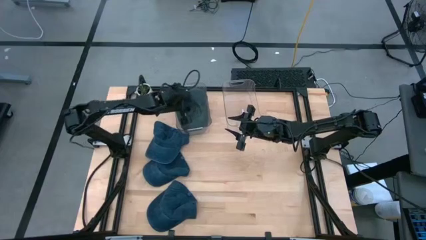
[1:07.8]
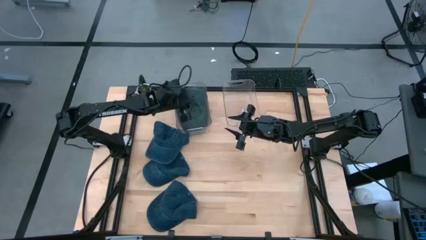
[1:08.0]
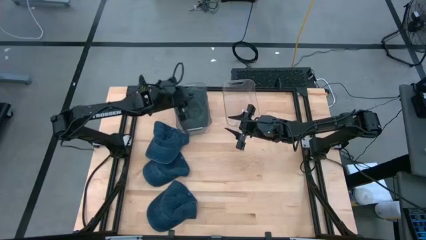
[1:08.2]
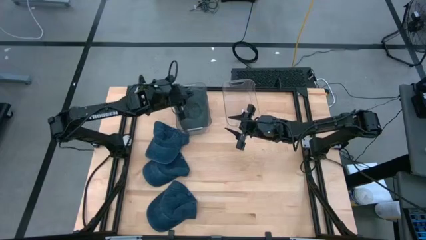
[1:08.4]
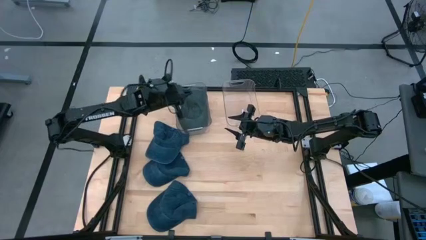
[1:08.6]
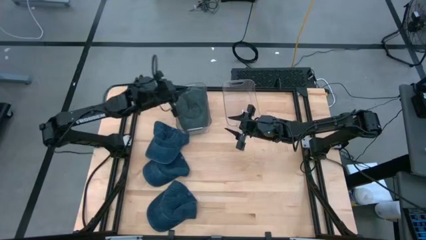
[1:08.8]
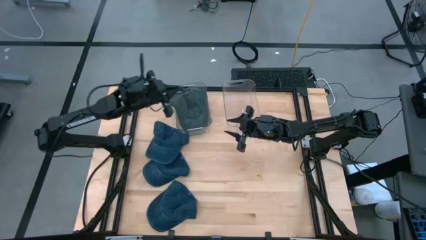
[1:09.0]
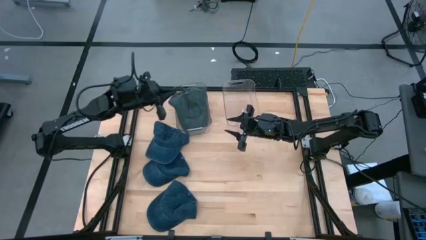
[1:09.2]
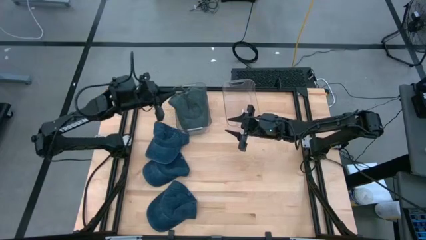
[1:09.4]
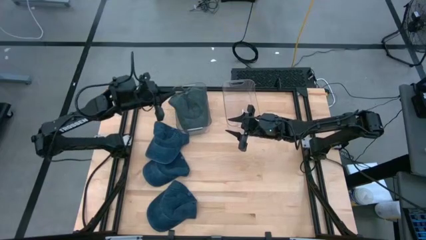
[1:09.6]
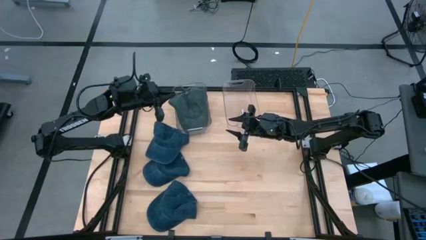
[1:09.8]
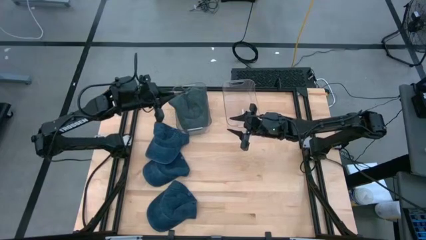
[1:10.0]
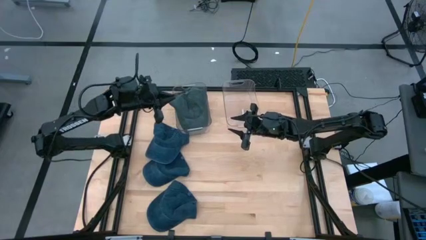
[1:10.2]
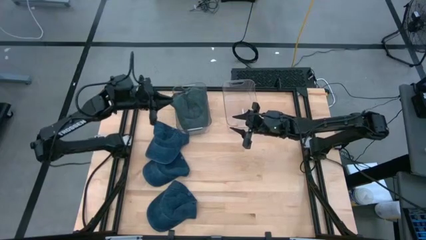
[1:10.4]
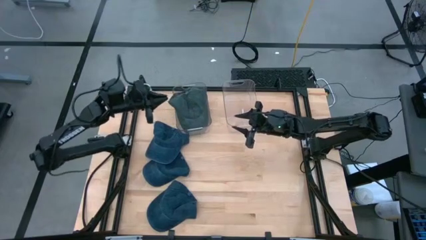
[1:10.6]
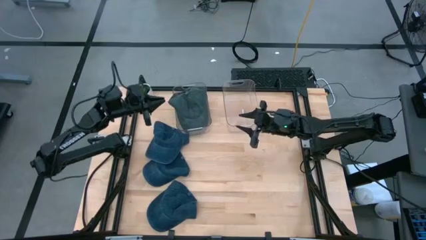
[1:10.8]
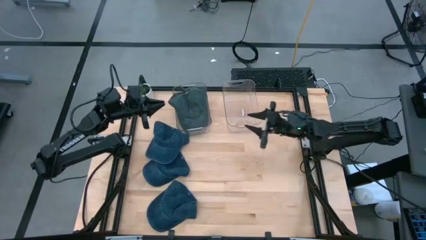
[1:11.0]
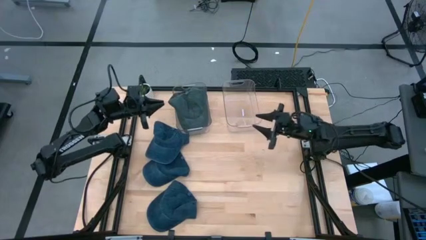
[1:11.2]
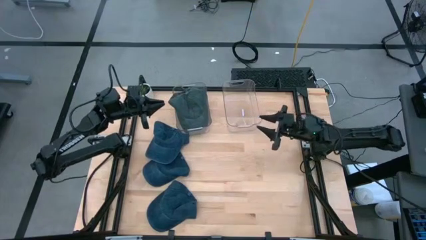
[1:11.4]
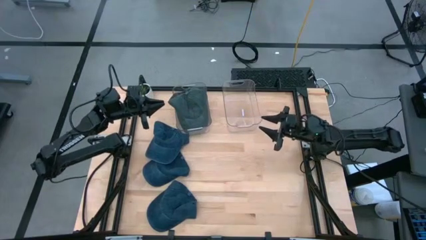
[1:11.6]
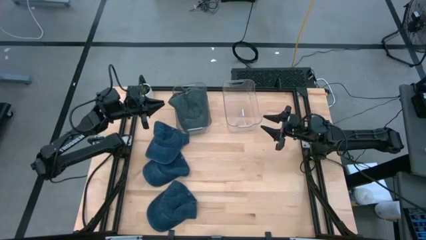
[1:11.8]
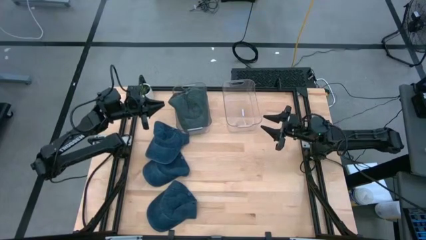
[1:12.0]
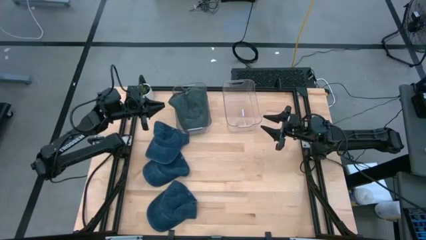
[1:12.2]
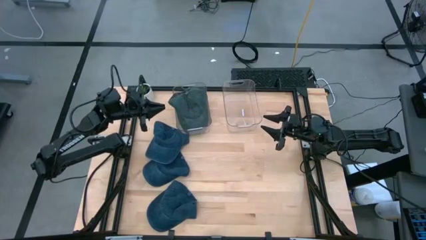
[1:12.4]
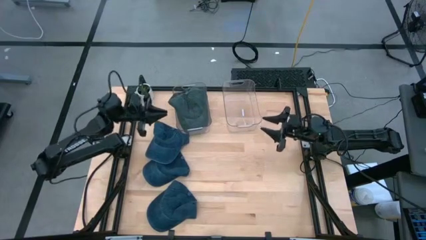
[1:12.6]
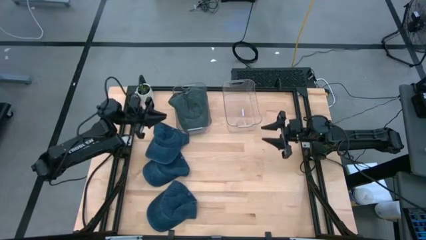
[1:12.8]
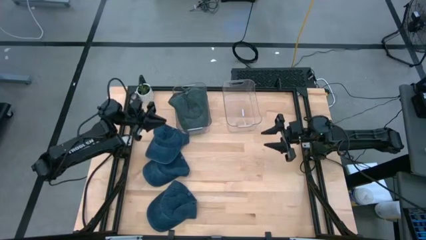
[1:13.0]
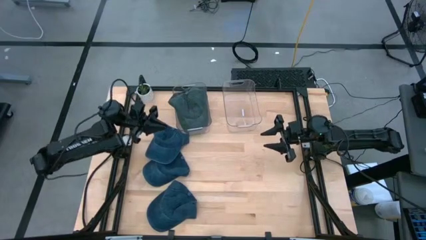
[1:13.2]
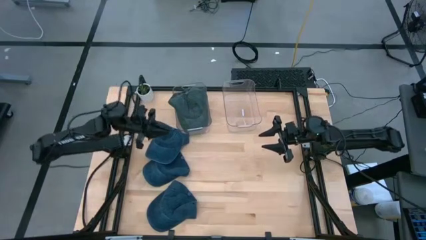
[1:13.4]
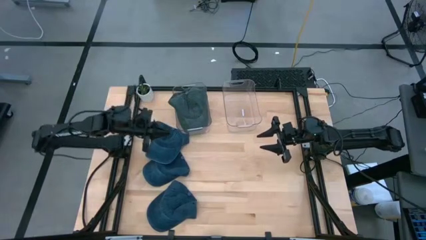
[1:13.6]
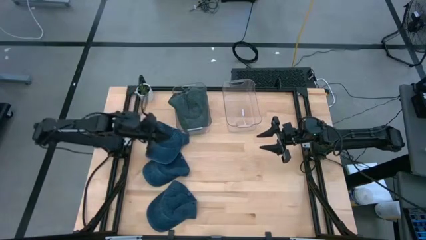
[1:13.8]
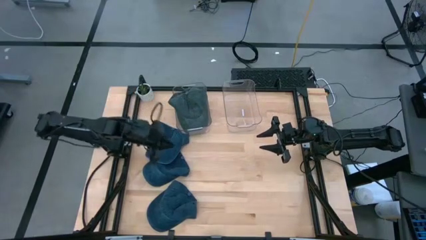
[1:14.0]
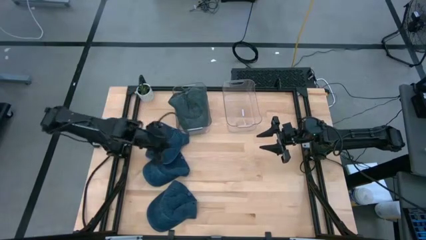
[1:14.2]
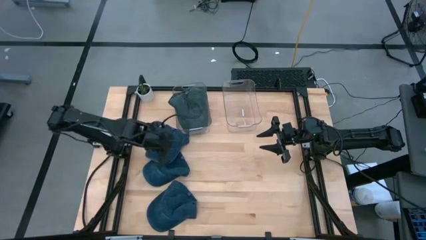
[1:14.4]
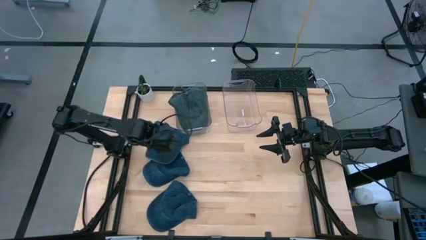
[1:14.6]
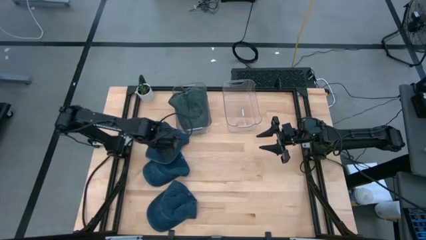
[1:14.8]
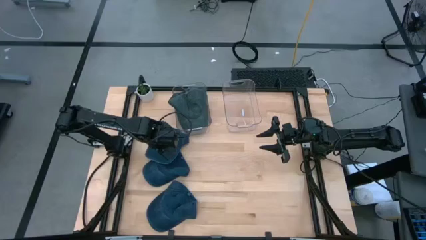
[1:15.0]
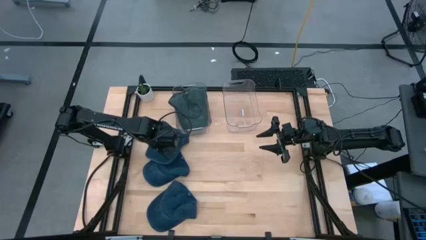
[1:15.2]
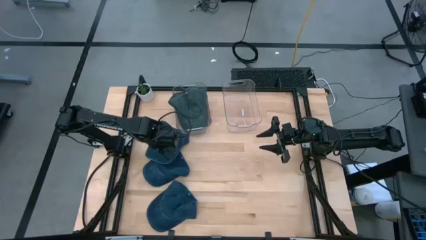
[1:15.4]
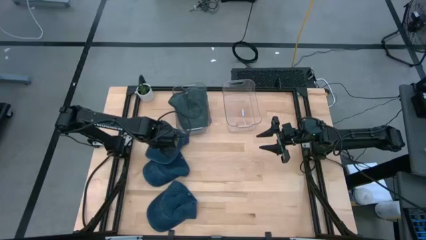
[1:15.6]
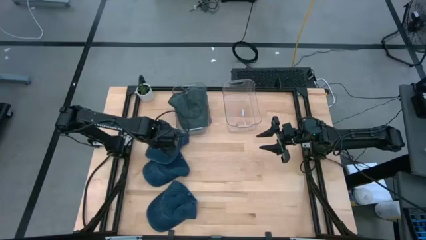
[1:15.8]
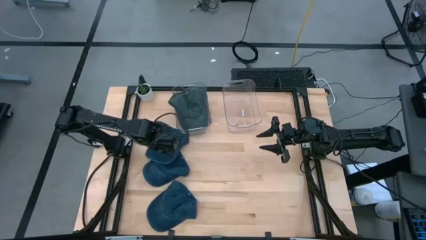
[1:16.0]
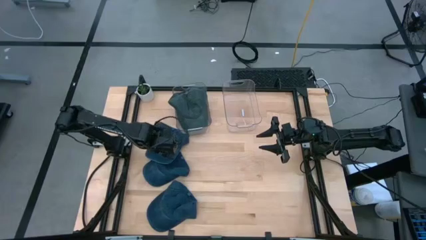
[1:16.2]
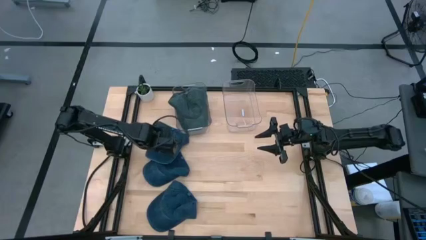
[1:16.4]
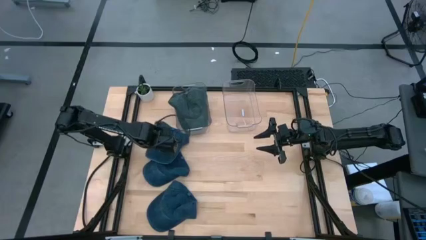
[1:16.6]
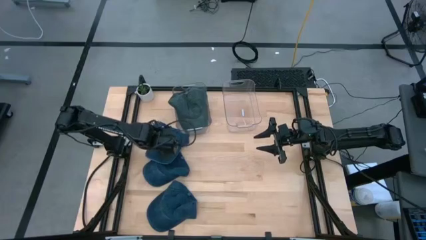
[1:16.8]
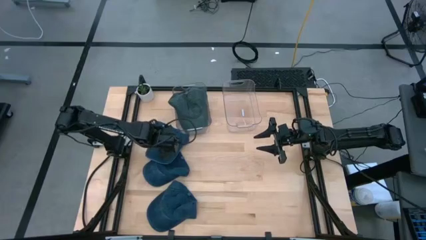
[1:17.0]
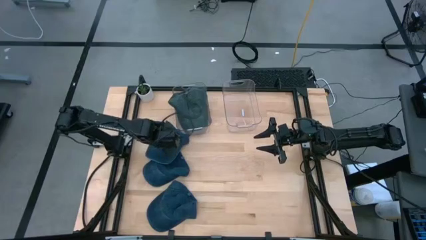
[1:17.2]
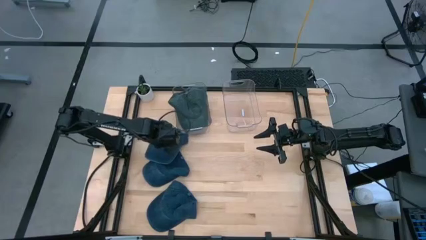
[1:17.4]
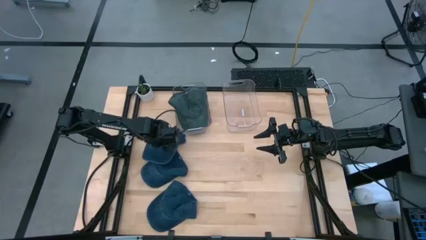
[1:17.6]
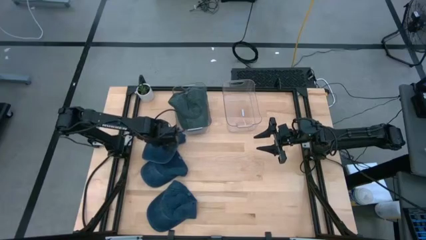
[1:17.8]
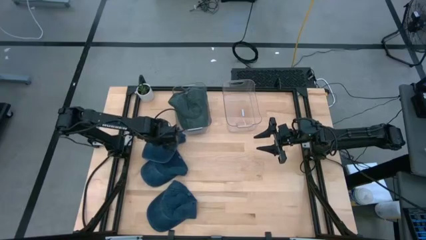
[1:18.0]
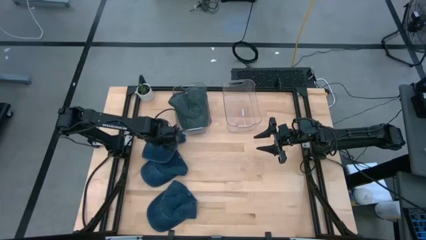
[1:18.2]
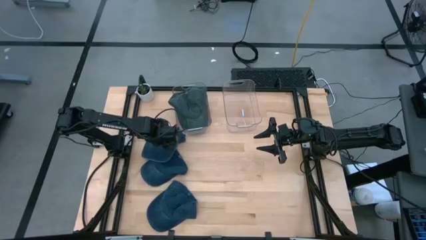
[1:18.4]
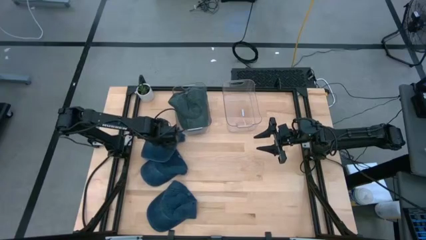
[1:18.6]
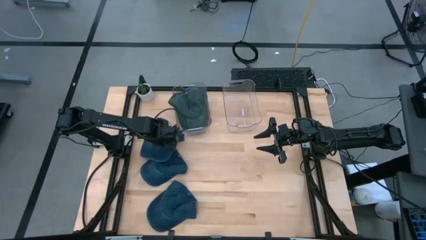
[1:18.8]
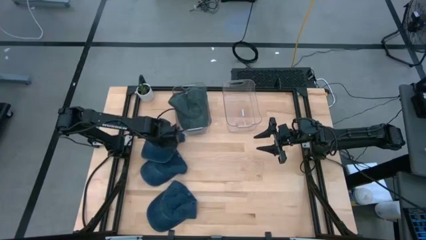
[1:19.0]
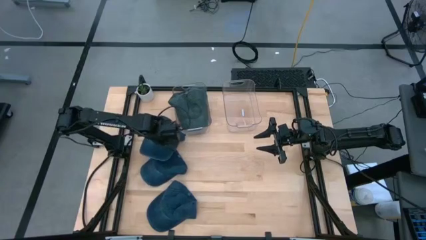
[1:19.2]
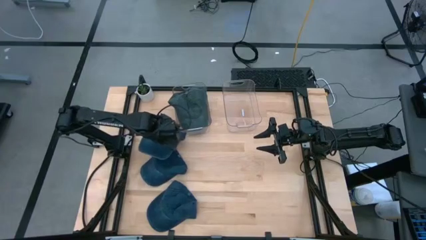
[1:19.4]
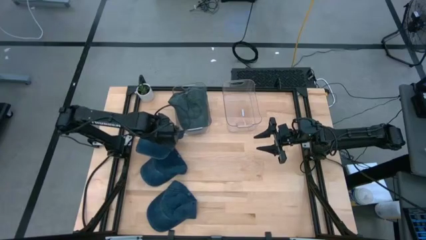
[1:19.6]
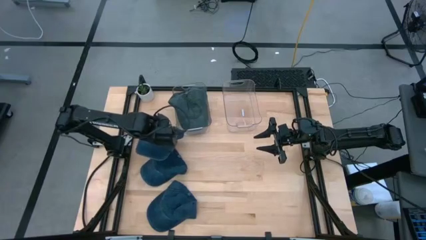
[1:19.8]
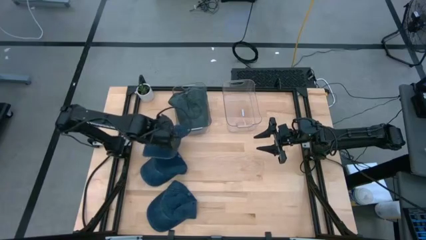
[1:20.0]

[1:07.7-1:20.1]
Task: Pick & Place hat
Put the top blue cap into the right transparent bin
